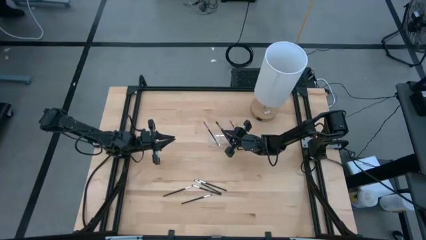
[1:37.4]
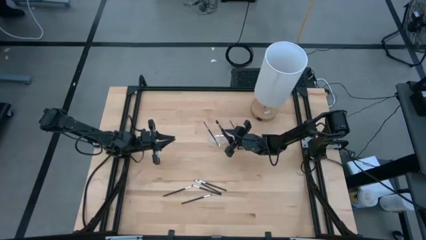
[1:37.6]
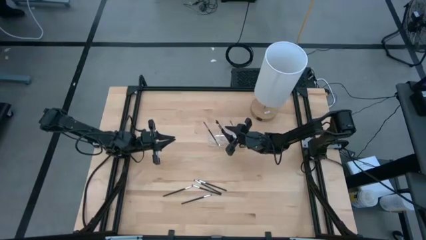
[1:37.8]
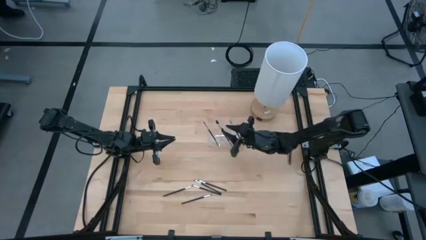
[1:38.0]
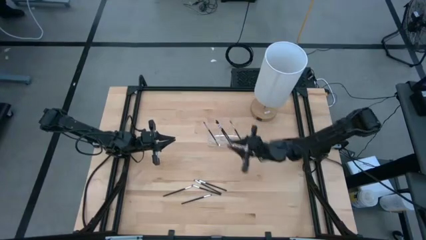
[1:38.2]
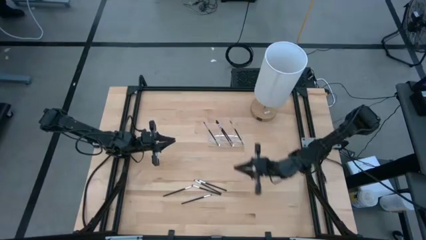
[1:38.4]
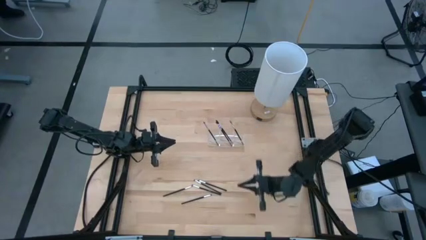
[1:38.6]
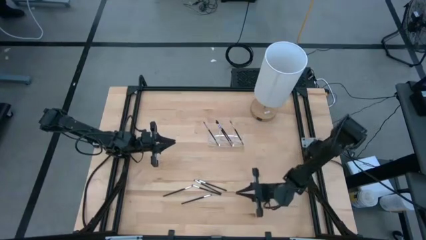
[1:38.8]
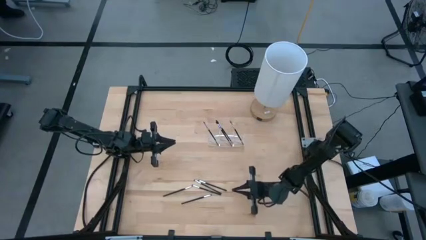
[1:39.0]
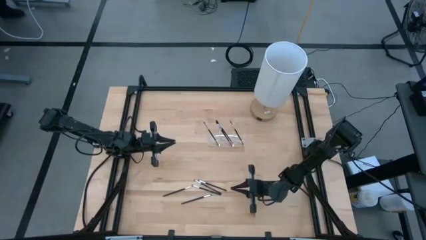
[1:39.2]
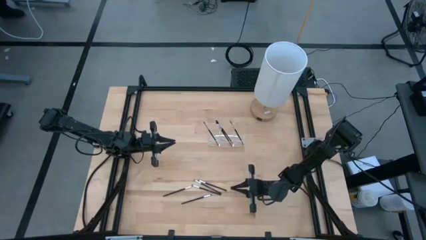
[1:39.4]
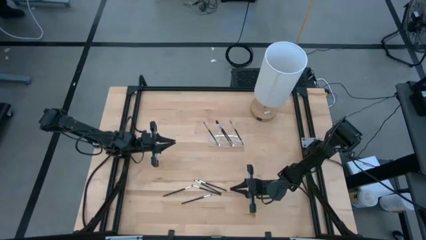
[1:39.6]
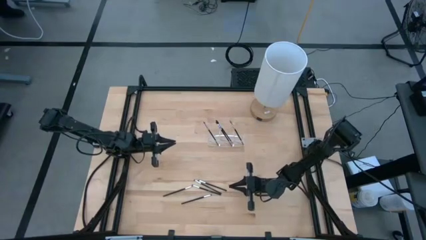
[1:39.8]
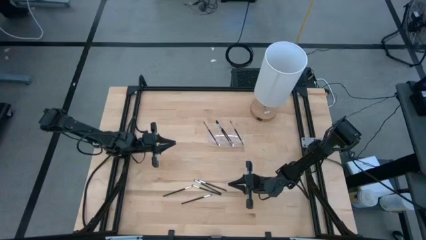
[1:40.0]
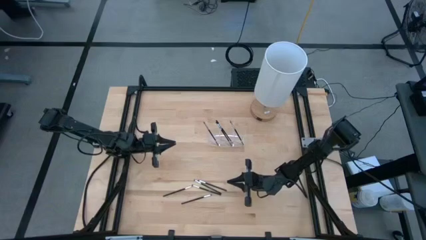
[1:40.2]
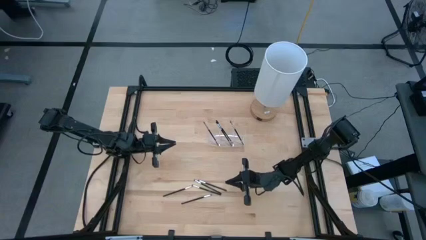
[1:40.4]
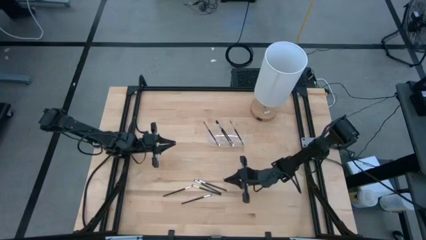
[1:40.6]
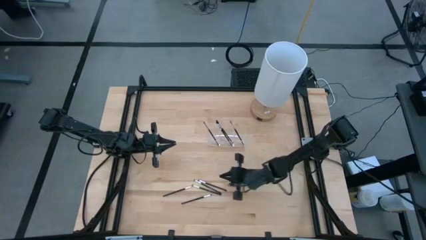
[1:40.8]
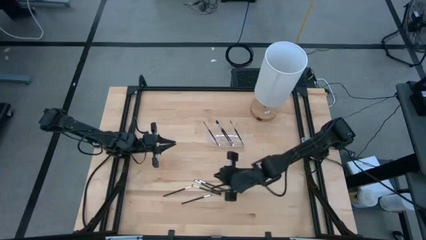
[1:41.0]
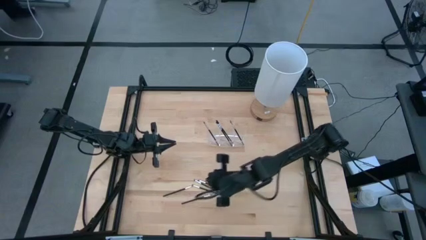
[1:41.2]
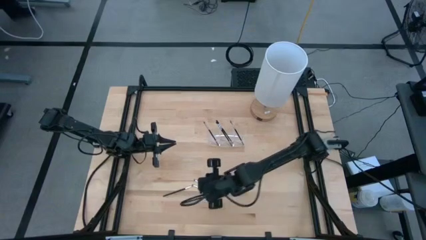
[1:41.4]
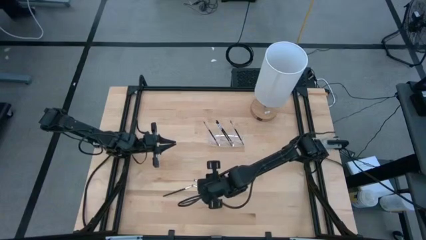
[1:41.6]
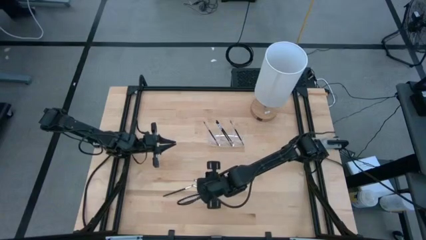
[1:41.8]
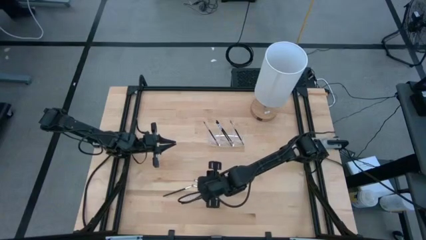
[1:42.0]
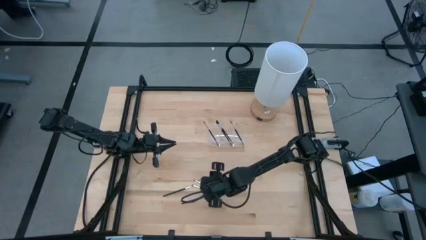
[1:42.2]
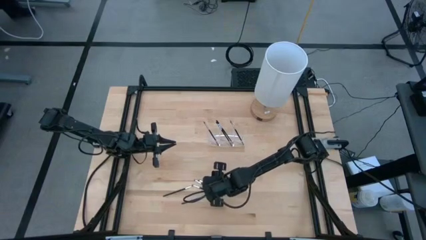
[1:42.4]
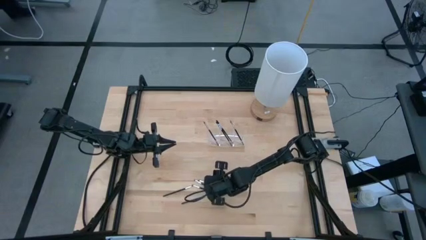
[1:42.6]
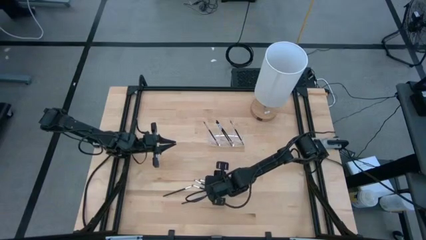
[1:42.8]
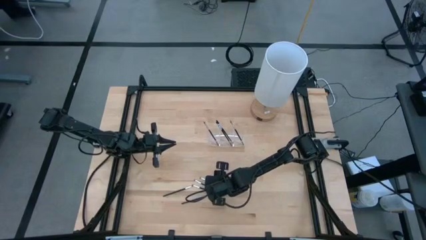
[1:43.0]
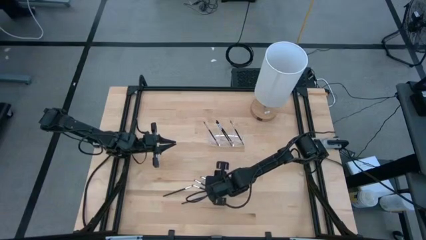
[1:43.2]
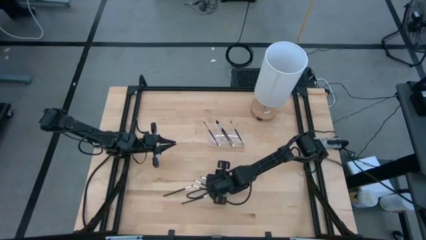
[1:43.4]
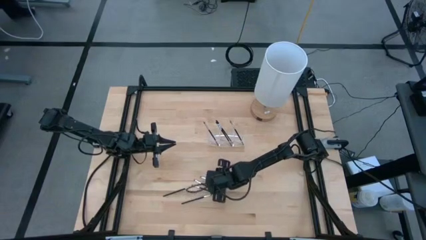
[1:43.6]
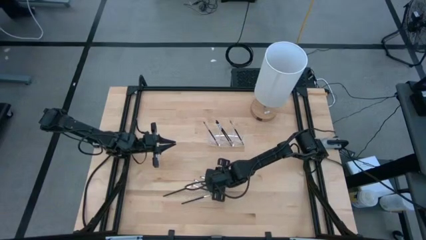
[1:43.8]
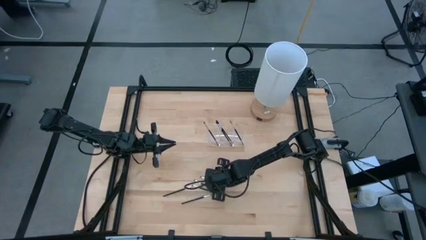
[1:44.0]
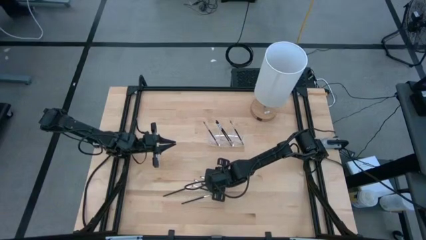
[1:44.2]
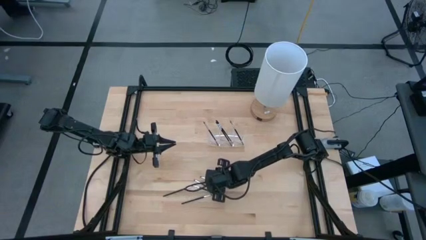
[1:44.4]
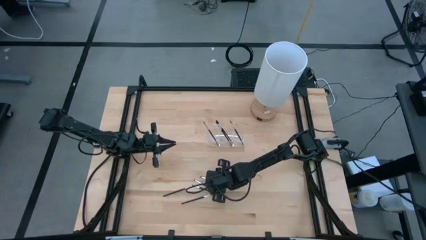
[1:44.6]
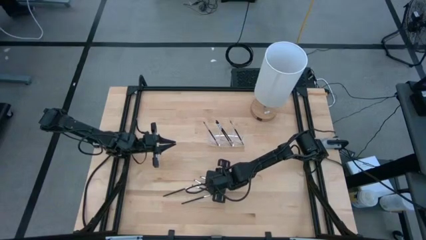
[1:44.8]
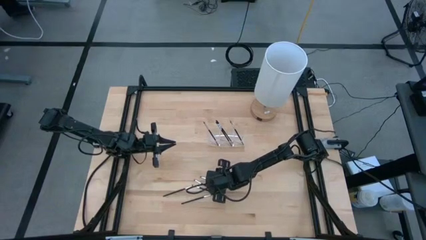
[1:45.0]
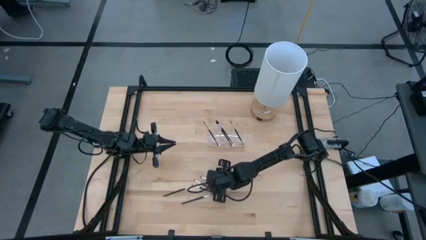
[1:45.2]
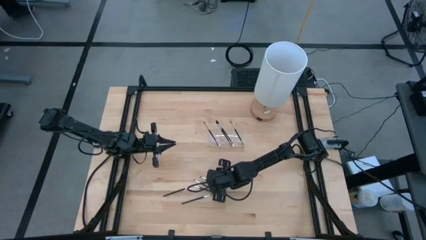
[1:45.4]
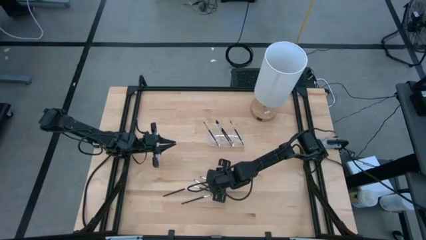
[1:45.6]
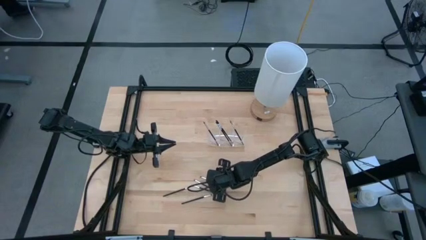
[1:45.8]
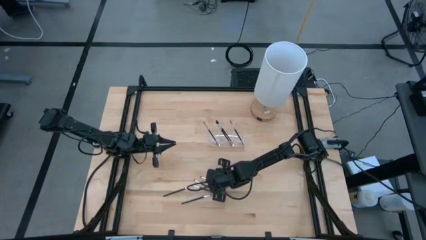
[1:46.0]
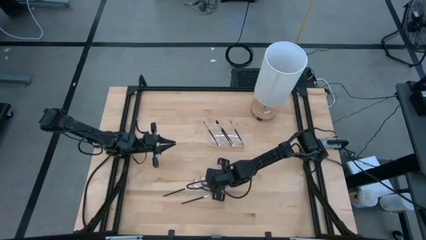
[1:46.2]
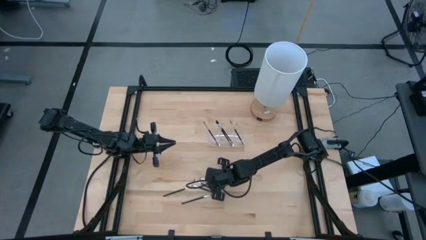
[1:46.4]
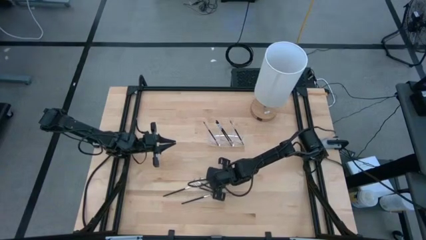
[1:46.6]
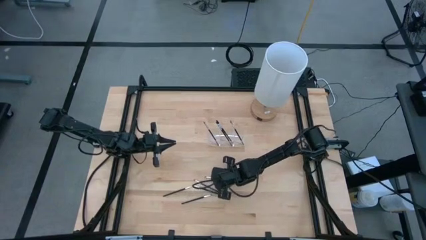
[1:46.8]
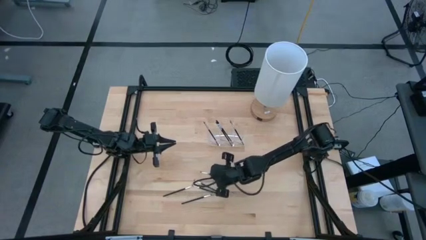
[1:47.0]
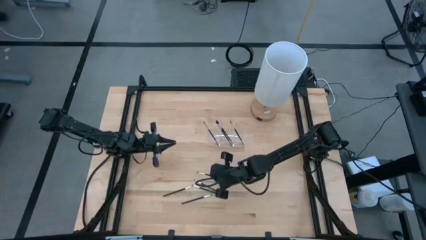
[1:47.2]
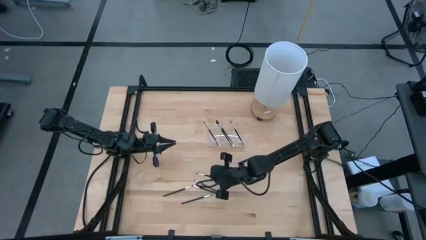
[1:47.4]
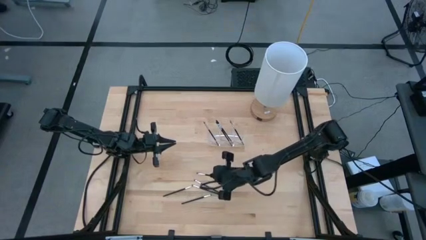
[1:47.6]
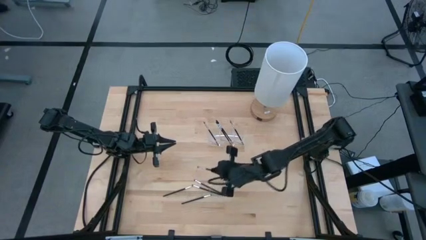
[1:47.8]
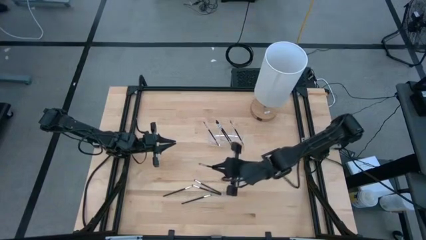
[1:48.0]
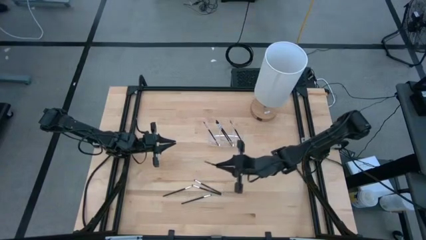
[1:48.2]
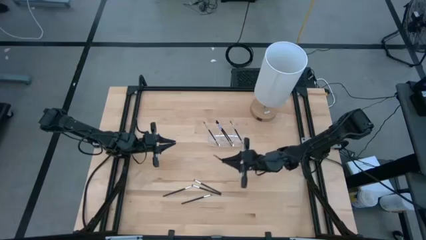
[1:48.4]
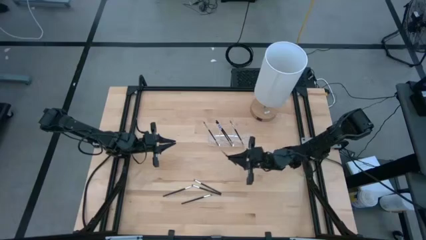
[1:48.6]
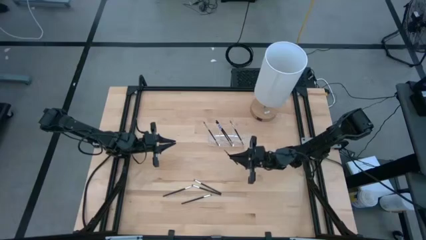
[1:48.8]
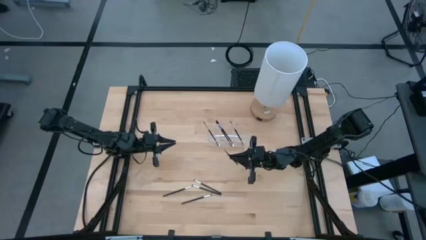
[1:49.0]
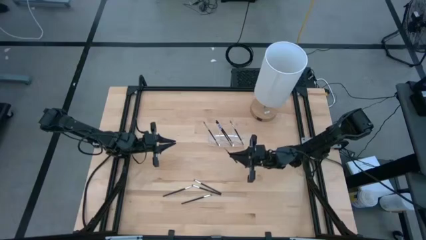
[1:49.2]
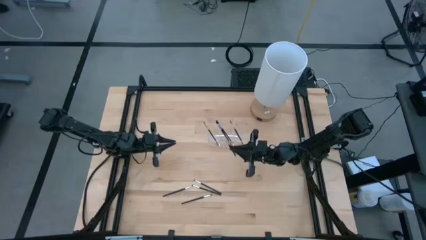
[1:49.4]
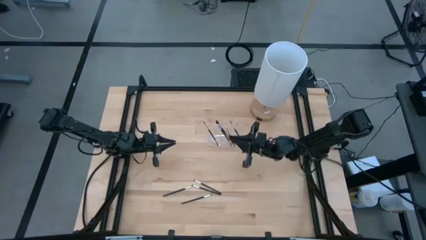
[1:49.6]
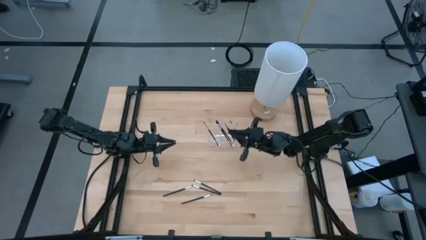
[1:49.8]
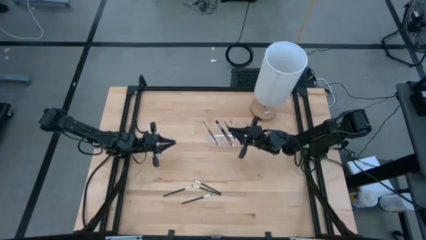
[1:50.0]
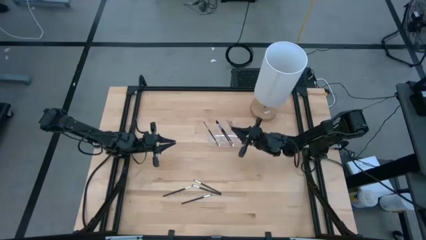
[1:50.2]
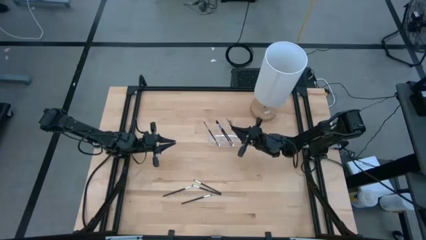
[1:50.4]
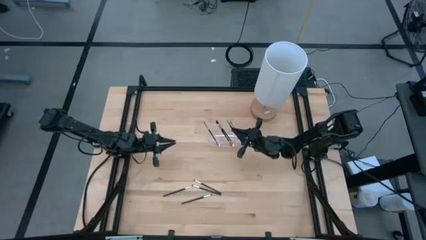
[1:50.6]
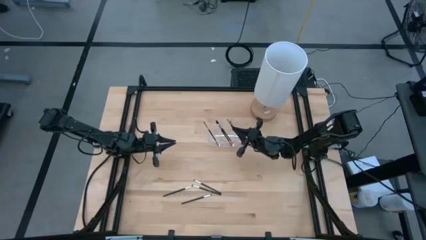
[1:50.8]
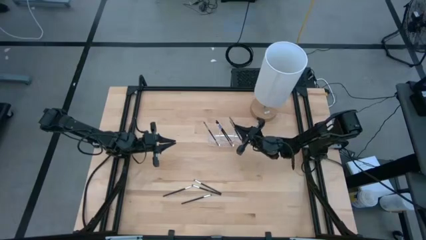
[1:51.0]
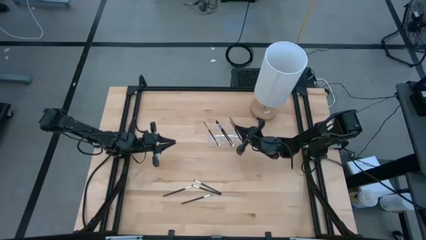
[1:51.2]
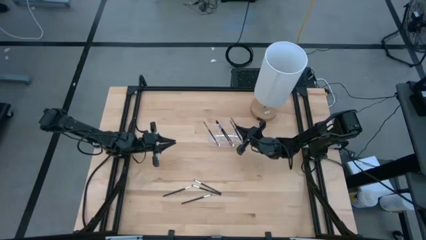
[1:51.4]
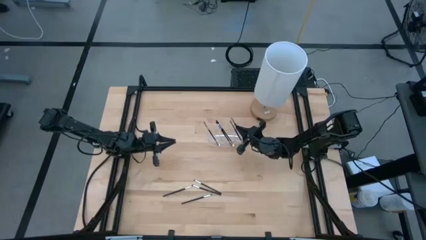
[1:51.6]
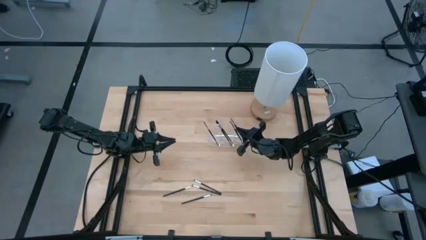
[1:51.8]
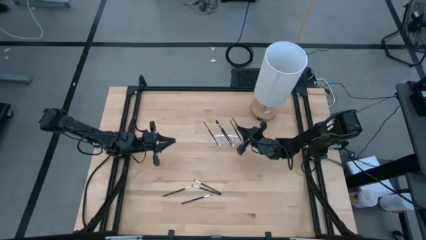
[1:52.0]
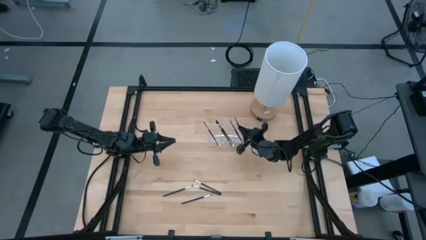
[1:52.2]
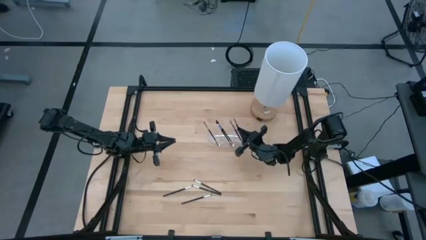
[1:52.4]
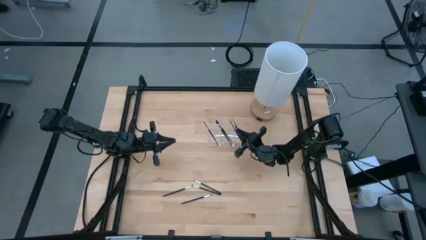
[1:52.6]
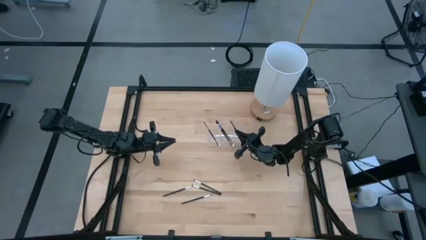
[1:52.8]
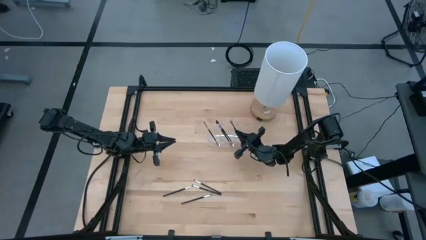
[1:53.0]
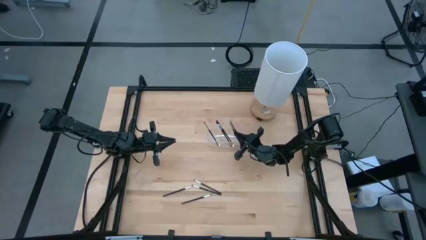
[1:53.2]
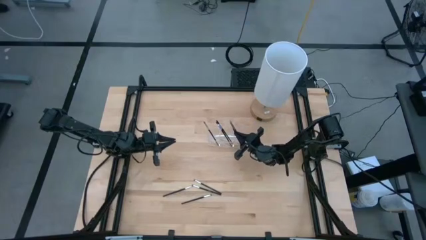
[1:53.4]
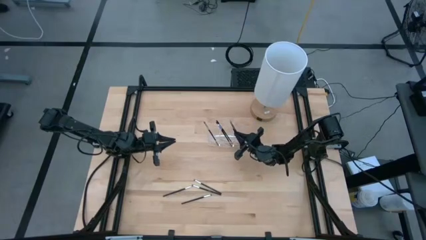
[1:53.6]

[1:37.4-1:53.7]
Task: Put items in baskets/containers
Put the black eyeshadow brush into the right section of the transparent organizer
